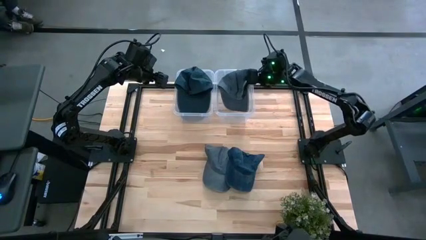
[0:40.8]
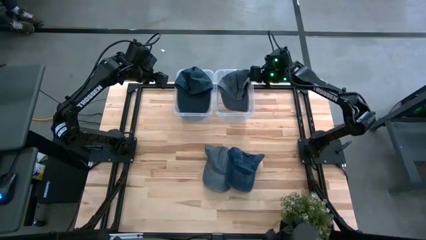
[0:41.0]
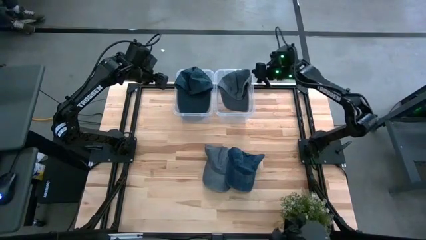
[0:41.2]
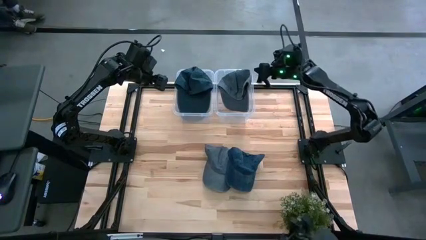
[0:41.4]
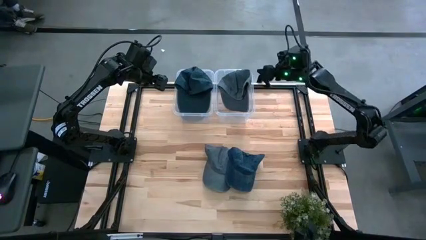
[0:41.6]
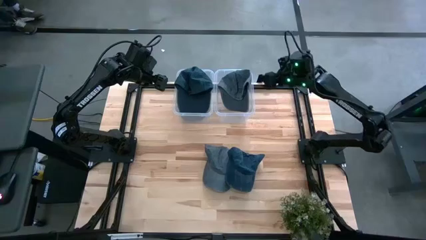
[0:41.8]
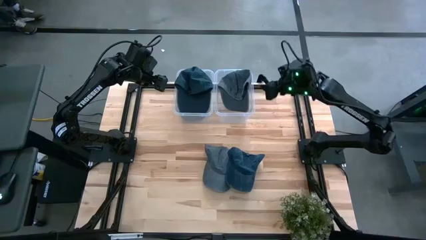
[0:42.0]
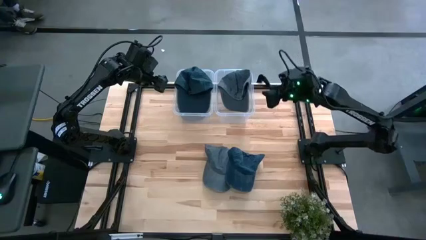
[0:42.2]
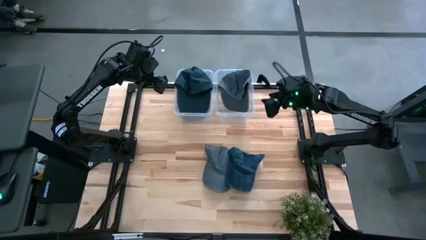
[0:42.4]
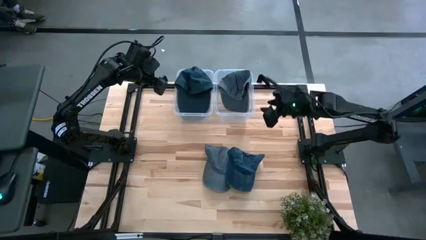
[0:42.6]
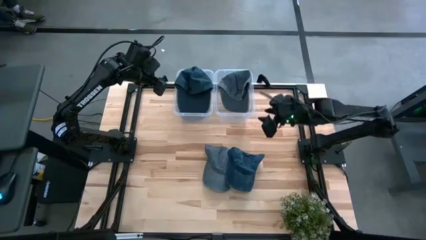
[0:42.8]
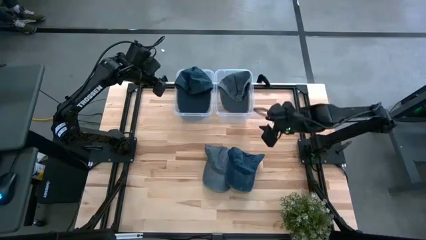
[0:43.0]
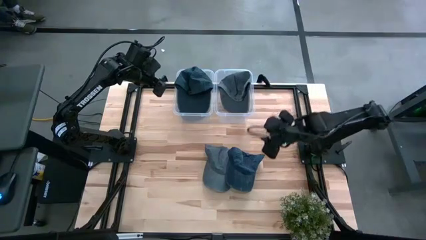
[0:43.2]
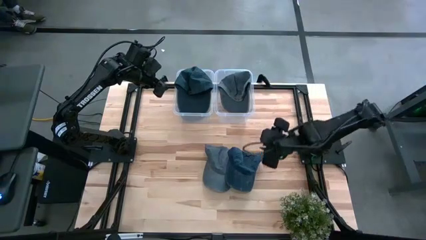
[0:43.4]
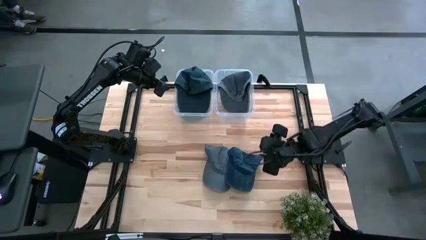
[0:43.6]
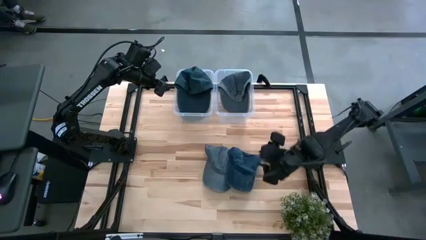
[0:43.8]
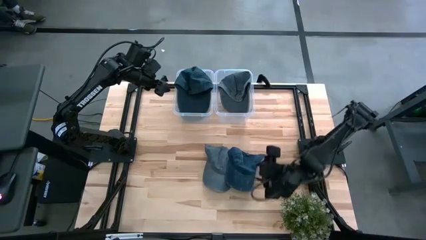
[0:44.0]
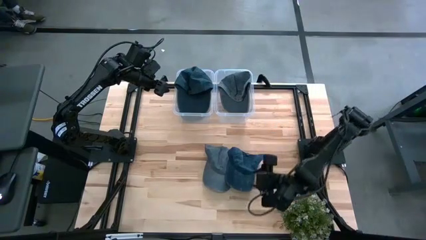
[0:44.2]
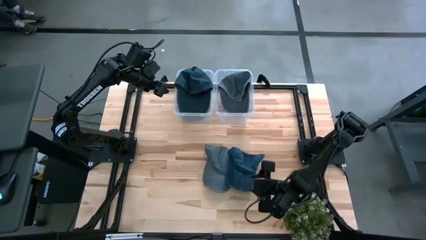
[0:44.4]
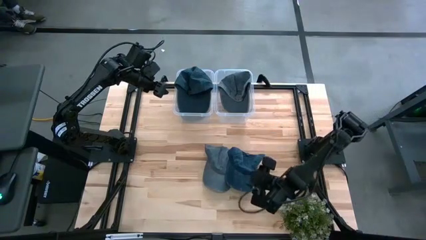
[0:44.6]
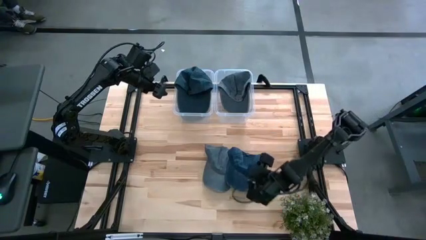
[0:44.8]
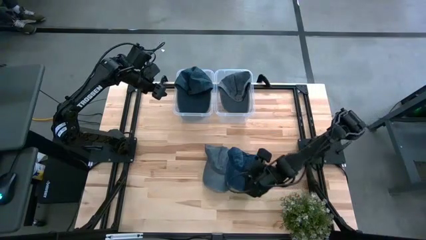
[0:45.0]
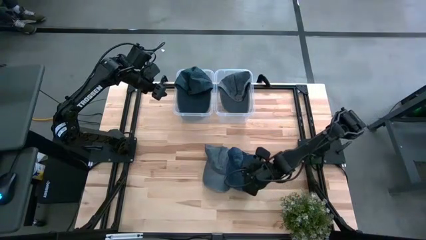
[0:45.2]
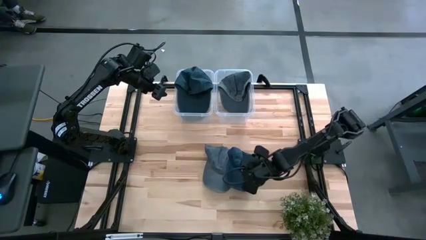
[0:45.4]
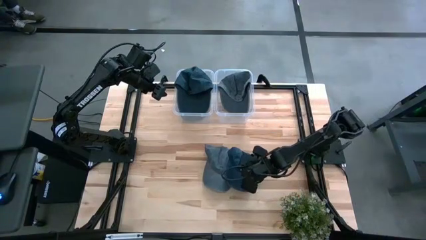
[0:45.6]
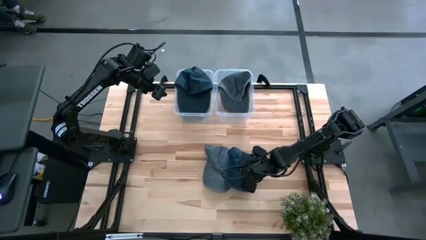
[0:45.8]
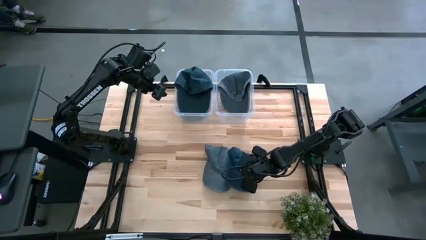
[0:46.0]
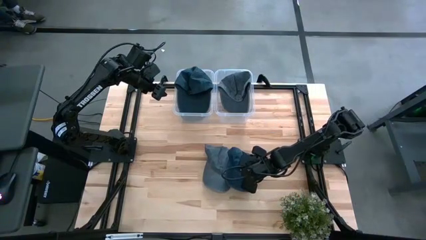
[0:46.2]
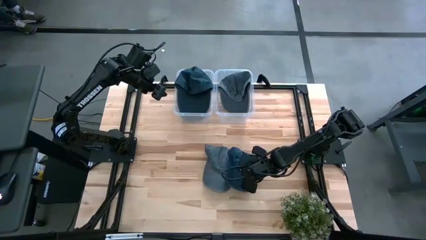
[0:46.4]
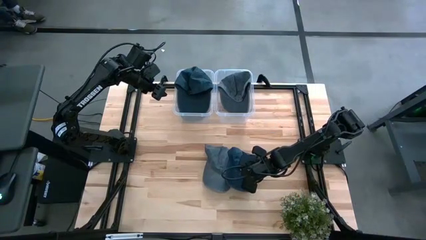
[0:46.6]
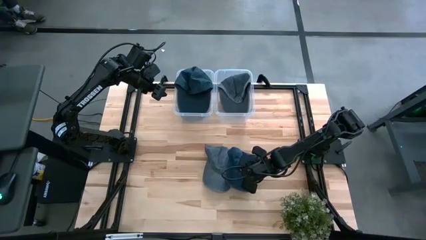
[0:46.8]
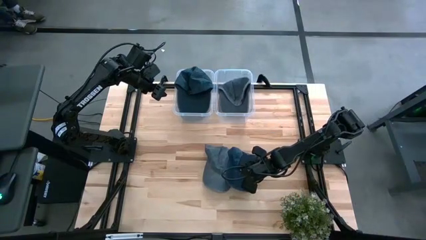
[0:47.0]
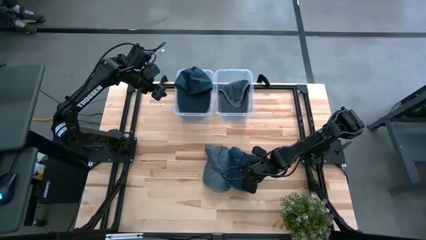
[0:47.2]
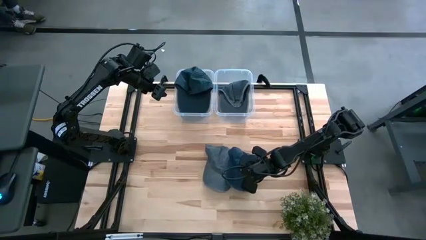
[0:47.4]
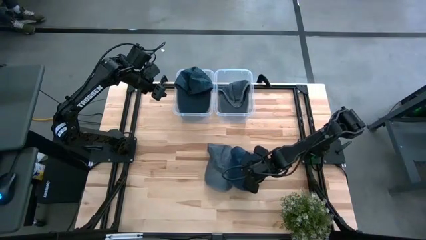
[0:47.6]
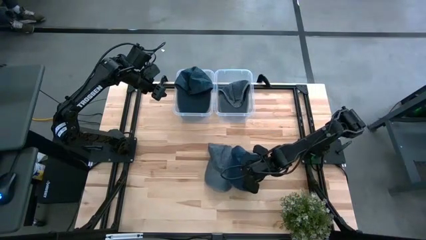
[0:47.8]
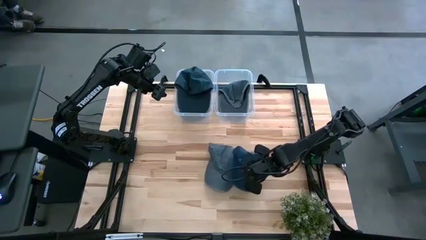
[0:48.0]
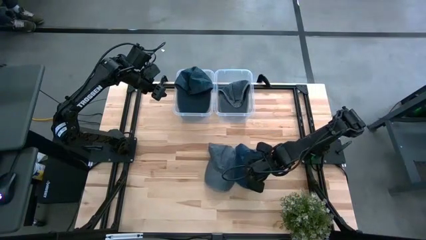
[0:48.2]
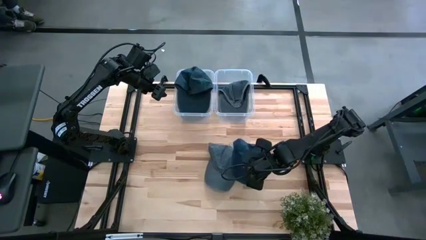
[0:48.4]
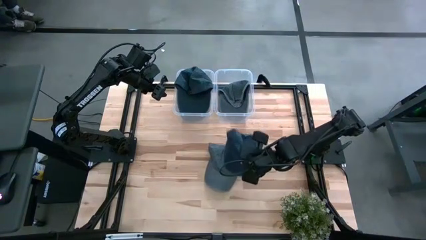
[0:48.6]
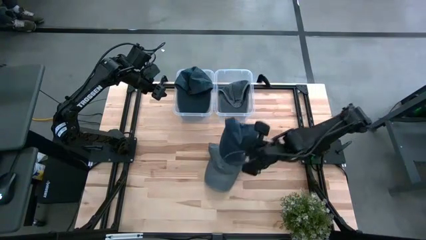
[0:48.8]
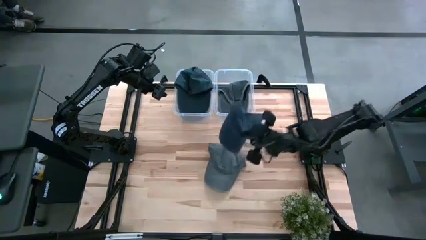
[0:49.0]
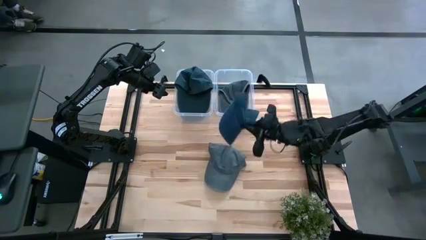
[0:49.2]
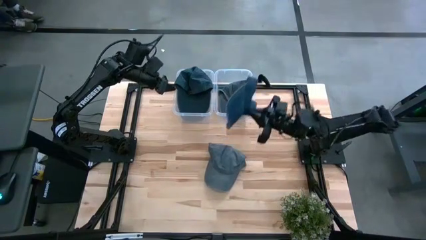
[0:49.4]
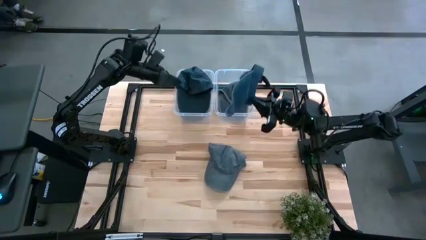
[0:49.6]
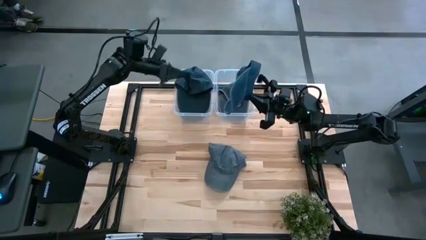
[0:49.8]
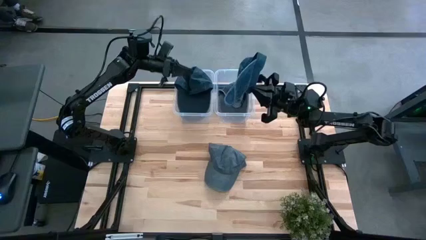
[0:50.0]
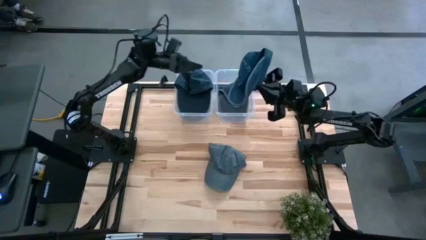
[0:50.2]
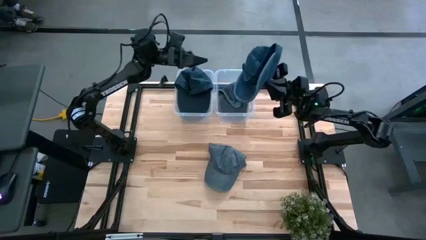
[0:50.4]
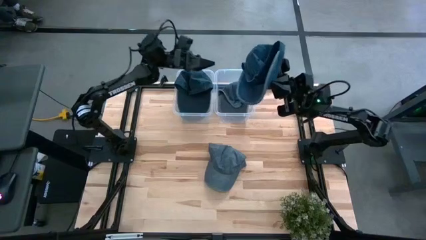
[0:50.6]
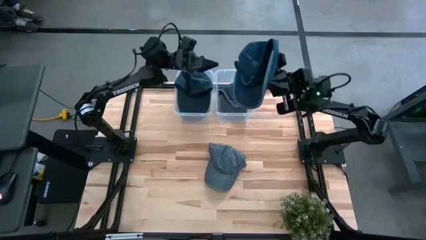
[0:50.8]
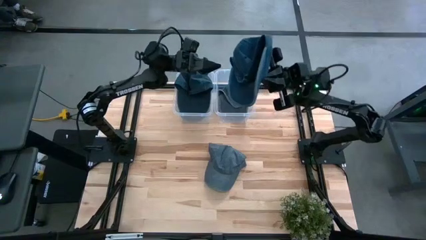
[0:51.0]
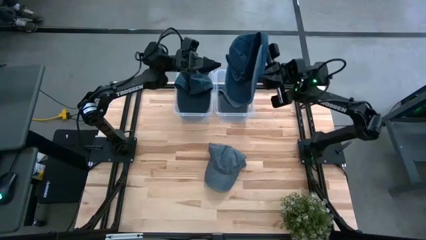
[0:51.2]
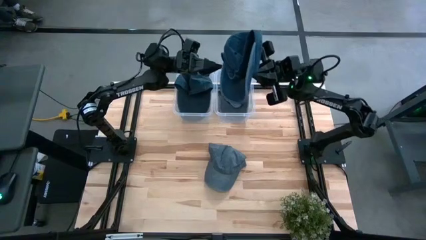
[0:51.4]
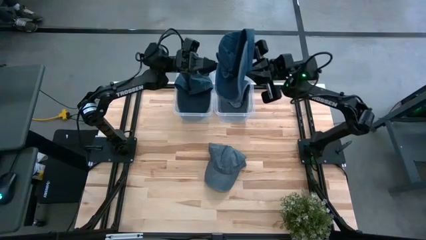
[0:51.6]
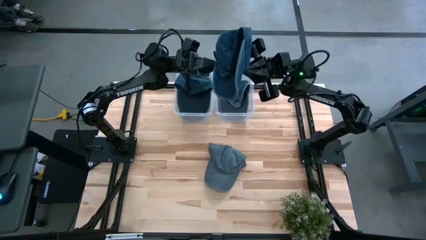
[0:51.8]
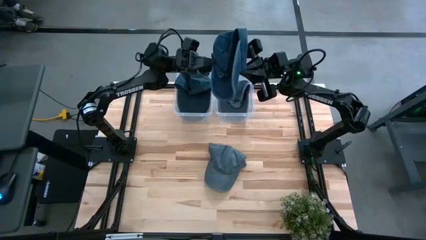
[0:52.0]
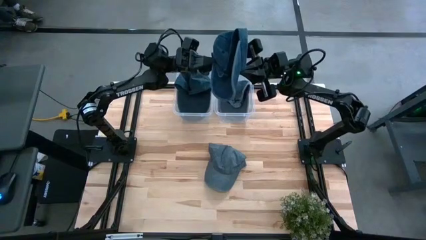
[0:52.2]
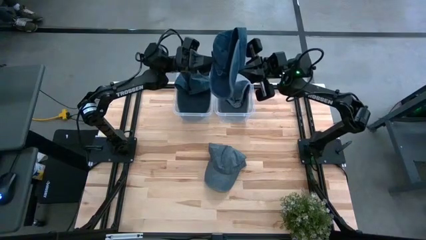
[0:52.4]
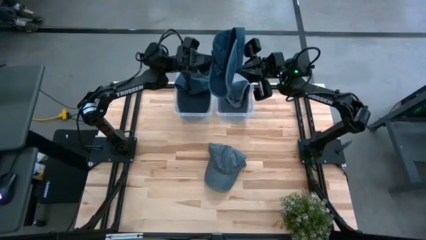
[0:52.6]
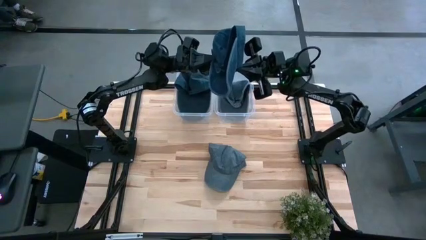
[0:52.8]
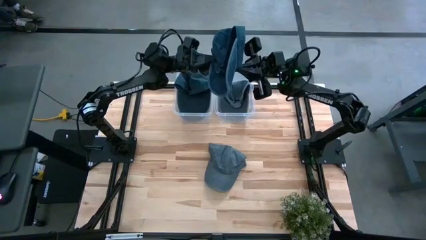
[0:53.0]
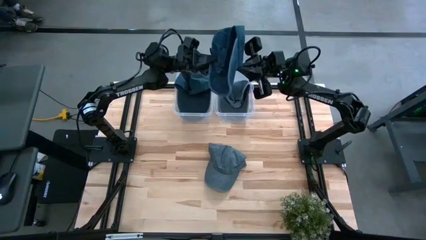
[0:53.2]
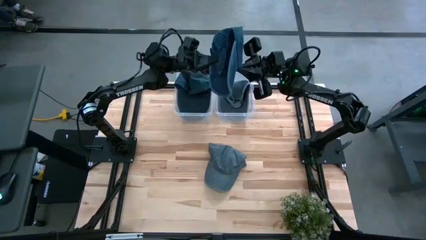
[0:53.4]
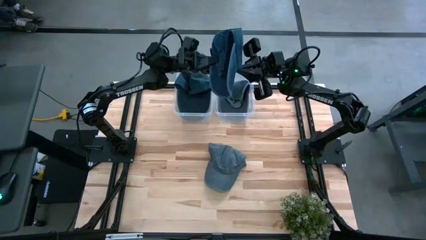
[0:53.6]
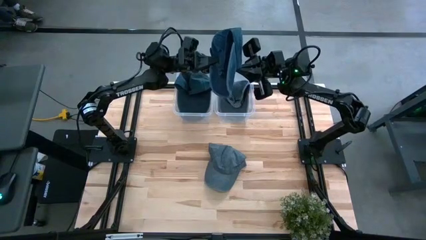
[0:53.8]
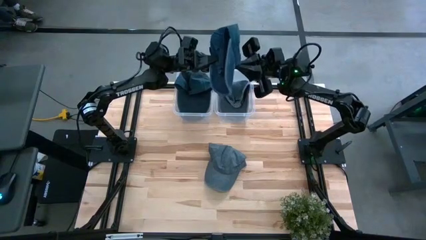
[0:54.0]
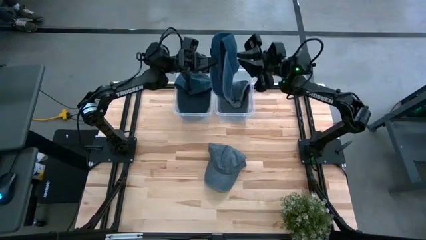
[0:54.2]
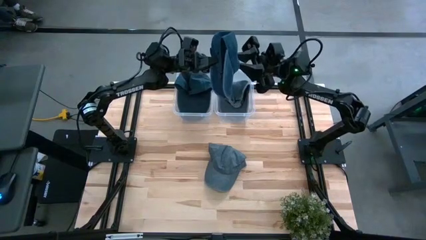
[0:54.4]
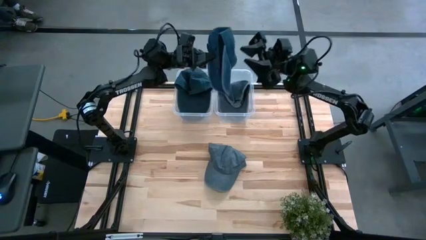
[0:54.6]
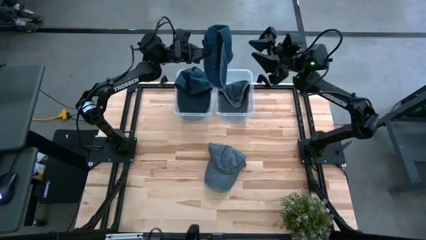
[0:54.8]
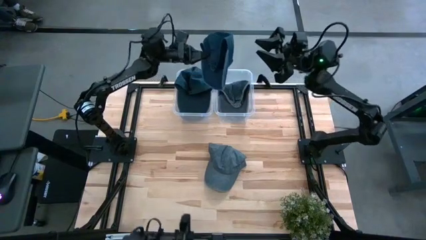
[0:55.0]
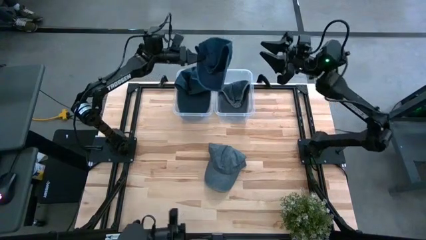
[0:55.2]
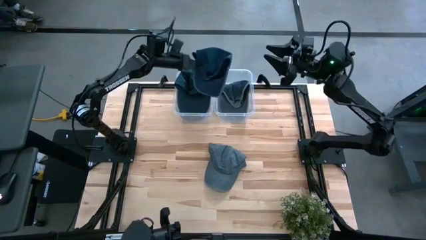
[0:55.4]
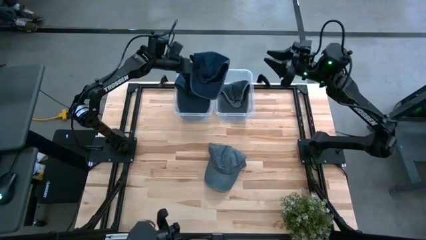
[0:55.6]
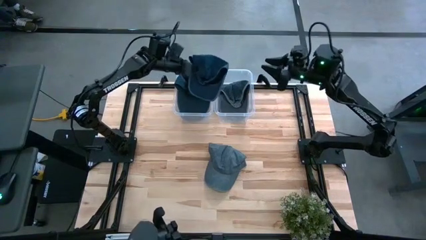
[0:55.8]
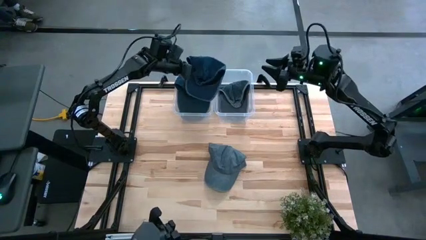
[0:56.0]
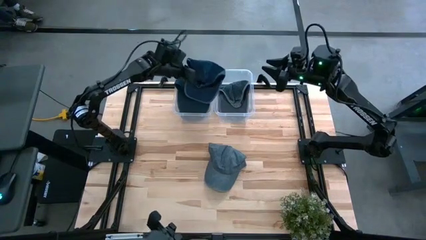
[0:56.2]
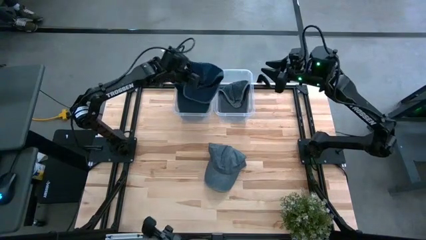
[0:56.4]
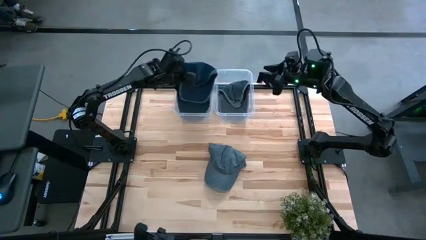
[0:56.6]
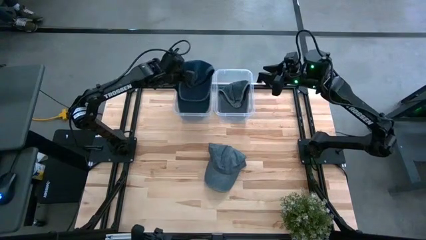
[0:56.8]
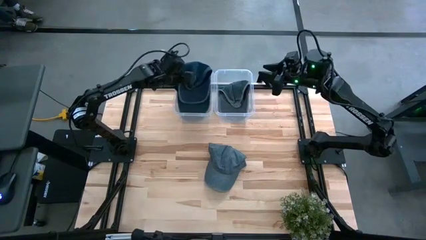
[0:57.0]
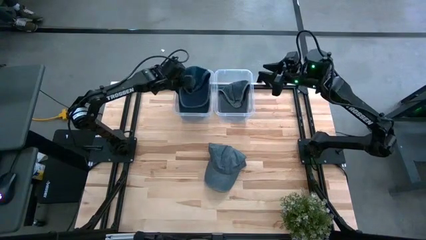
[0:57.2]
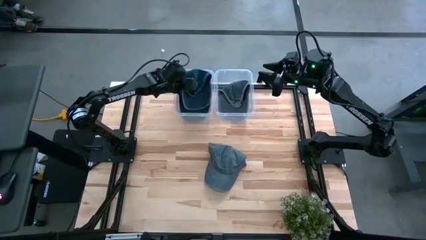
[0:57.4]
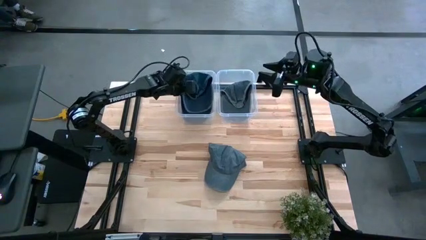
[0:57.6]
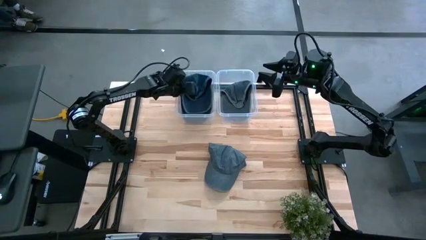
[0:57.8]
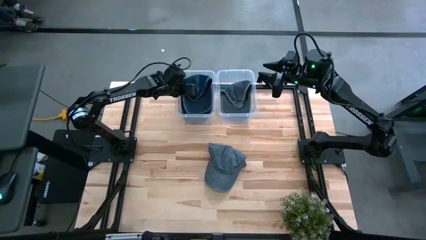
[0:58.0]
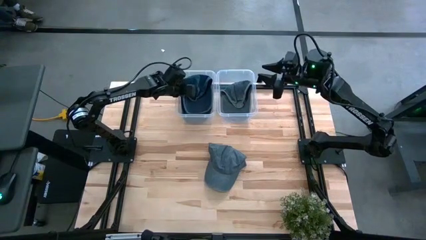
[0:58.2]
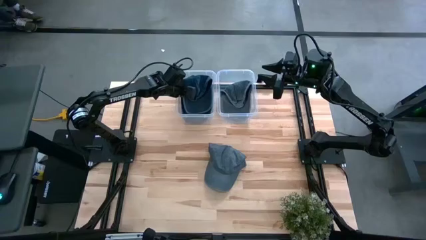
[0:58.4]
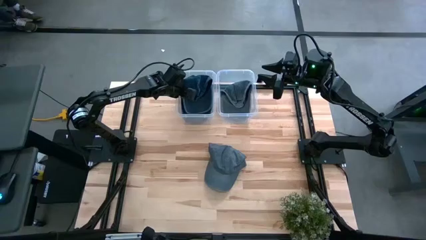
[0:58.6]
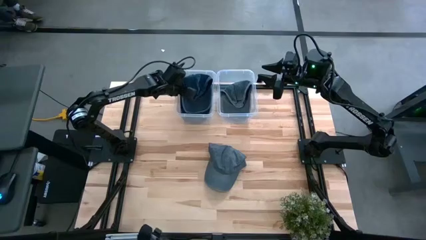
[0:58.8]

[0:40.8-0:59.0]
Task: Pick and place caps into container
Put the blue cap into the left transparent container
